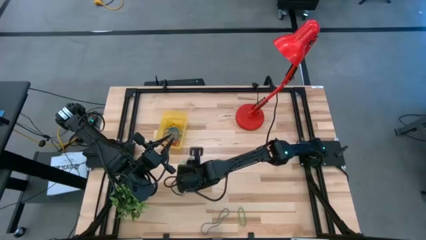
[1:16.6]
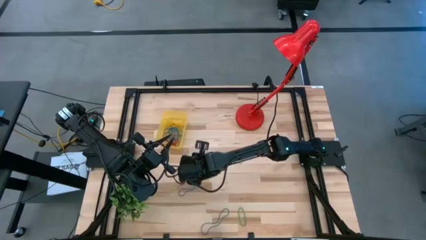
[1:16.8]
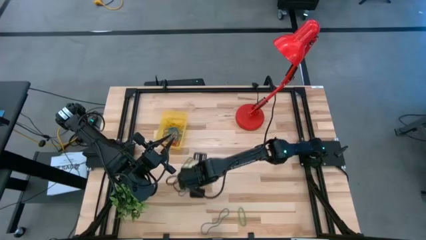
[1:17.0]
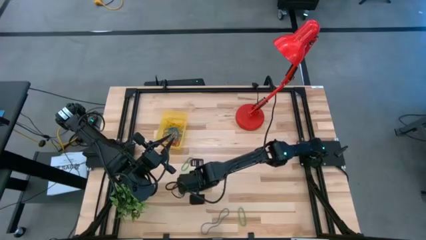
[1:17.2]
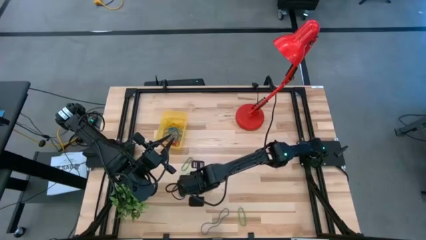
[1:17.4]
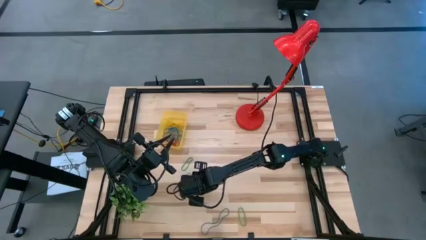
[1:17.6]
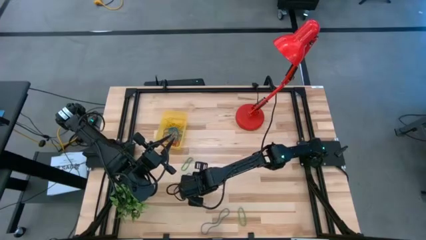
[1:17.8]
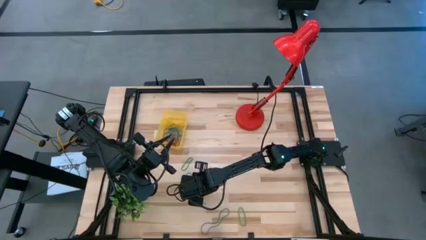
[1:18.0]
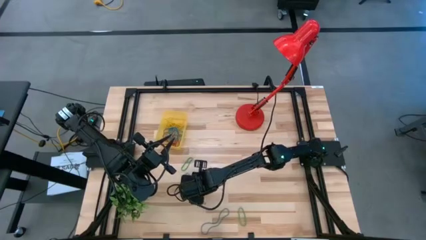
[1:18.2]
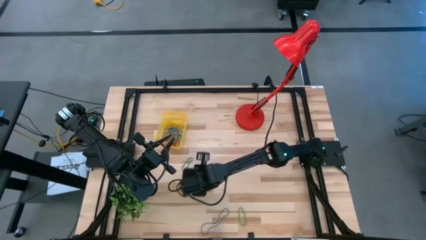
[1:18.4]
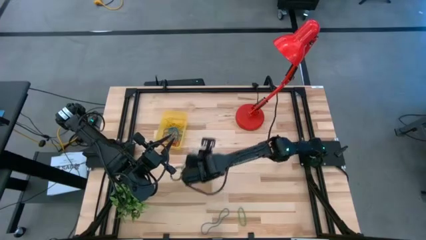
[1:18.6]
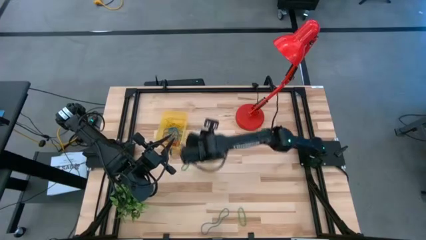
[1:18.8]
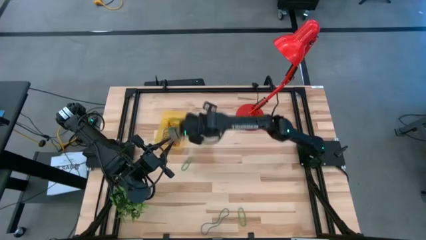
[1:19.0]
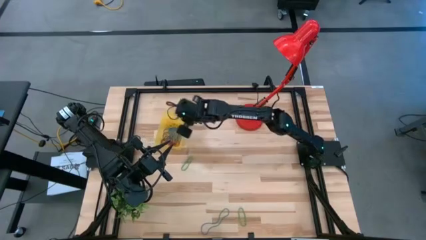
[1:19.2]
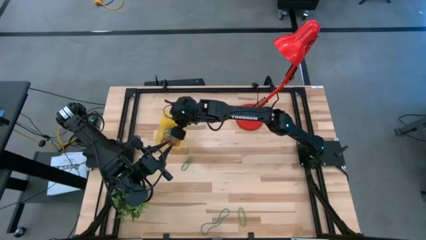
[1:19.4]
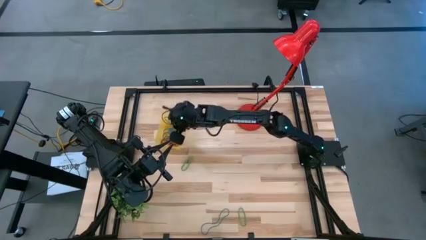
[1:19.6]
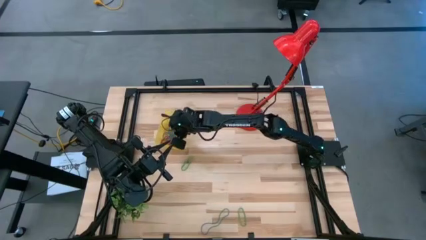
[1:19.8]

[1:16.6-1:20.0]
Task: Pick and place items into bin
Put the blue rubber band into the yellow bin

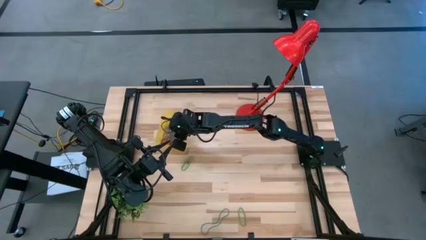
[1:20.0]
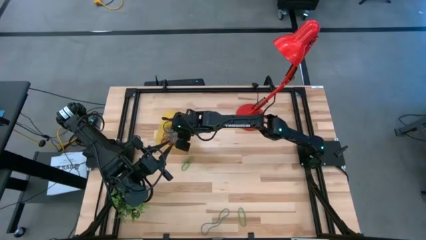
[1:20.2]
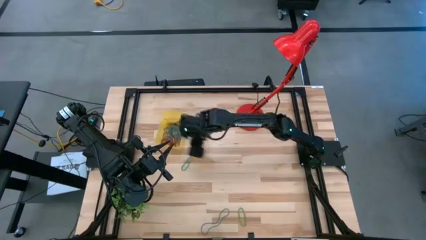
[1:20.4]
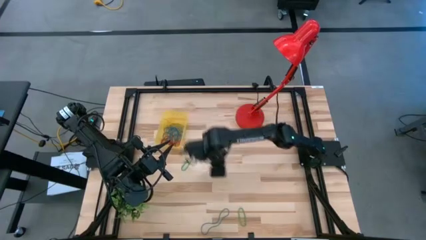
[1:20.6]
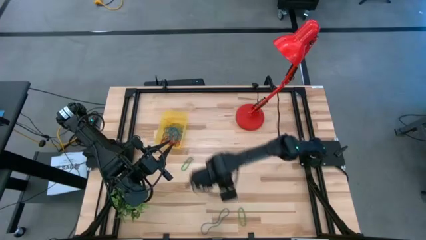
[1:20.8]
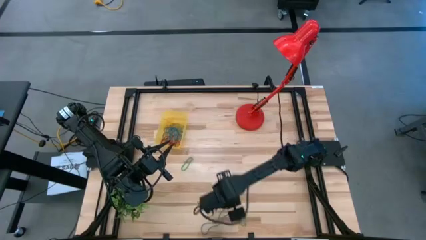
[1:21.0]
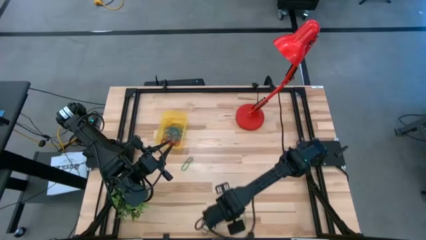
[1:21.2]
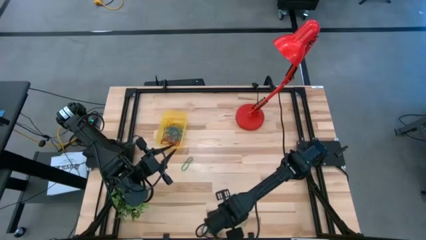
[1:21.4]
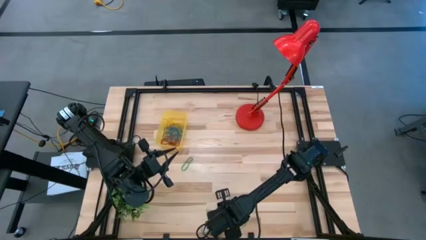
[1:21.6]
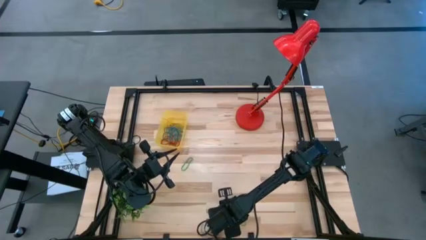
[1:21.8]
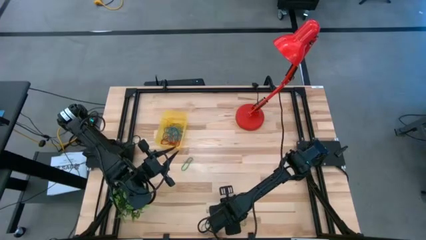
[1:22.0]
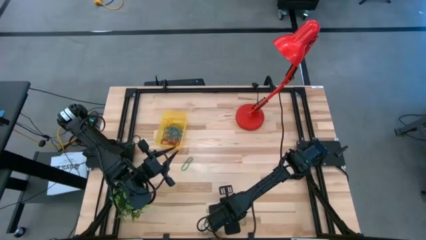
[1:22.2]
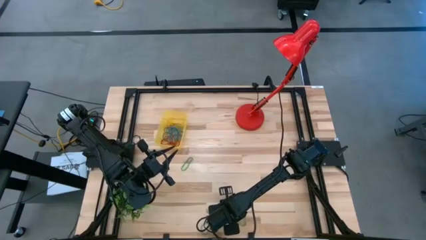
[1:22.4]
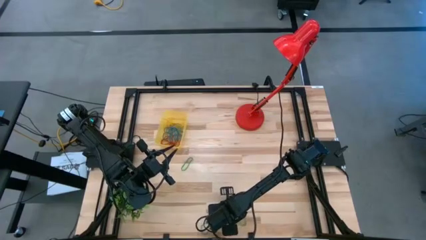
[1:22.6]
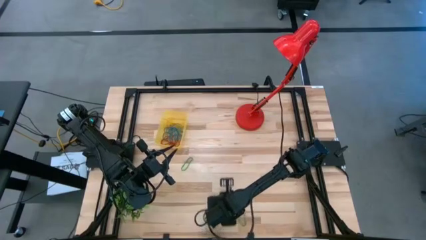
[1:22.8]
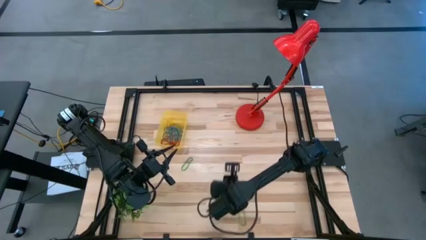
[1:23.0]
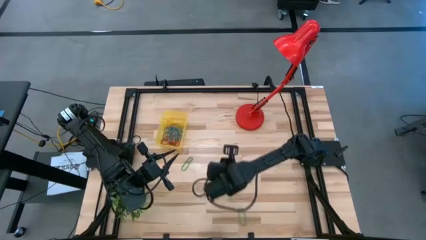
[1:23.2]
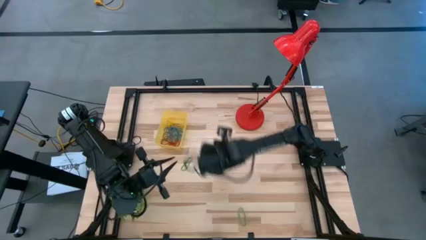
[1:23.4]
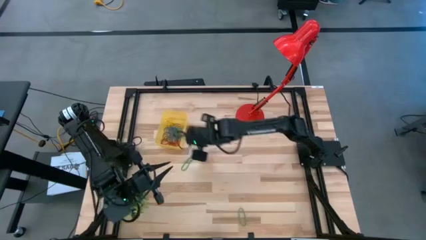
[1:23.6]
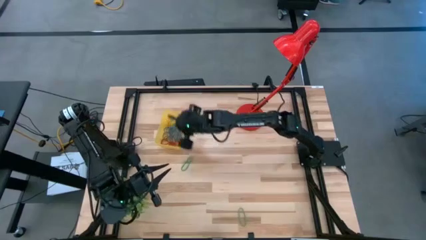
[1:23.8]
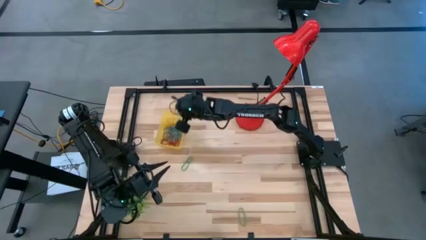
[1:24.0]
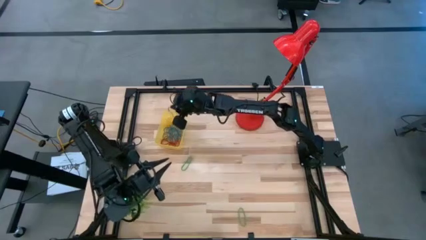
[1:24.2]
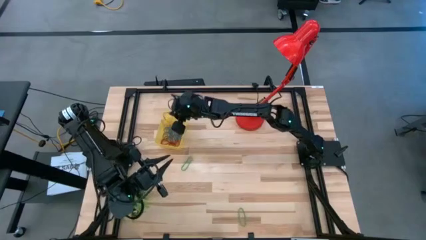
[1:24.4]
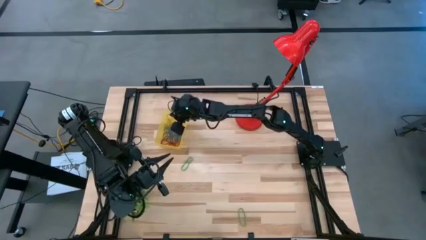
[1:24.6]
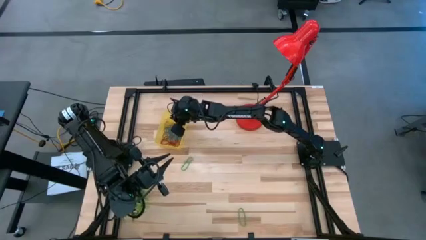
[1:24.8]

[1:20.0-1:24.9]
Put the blue rubber band into the yellow bin

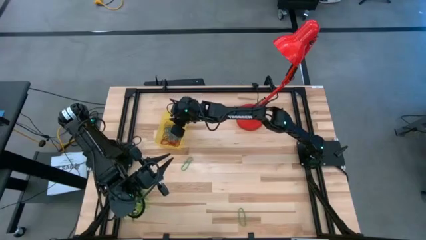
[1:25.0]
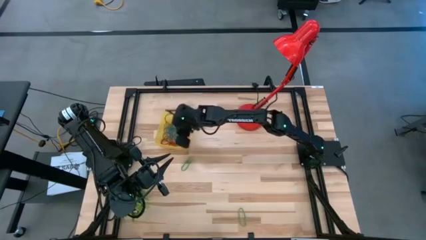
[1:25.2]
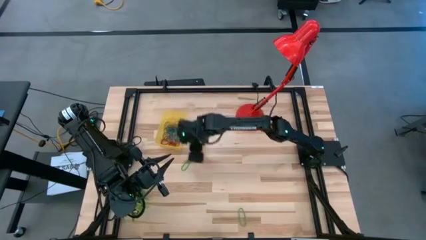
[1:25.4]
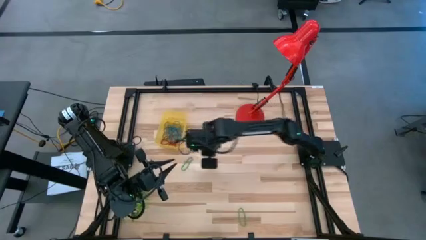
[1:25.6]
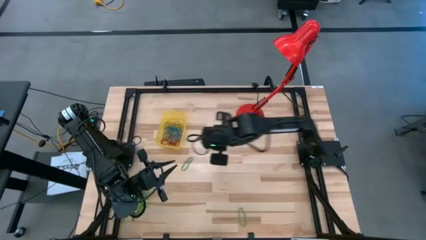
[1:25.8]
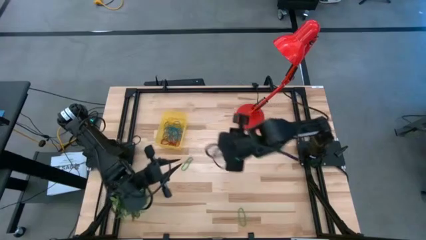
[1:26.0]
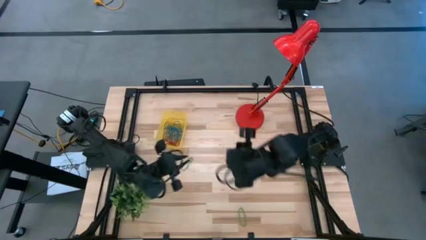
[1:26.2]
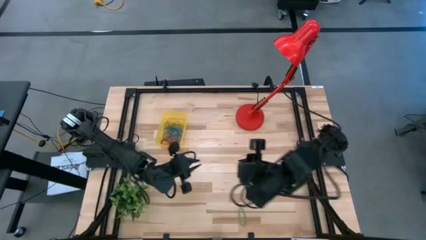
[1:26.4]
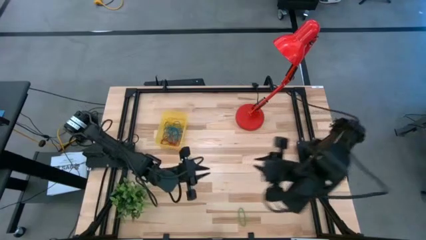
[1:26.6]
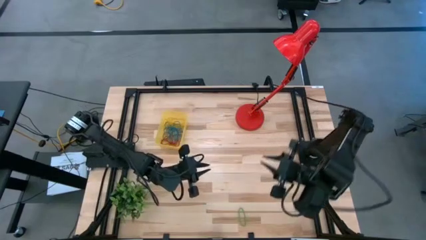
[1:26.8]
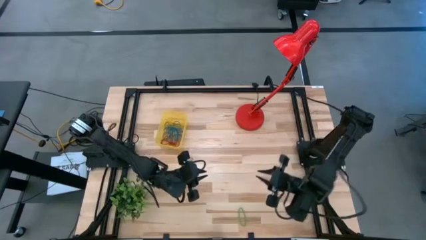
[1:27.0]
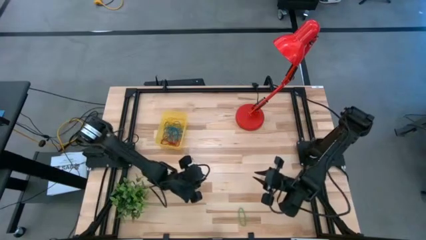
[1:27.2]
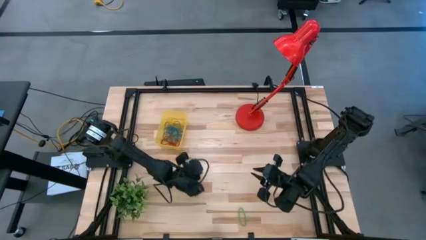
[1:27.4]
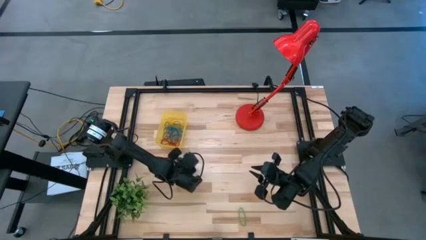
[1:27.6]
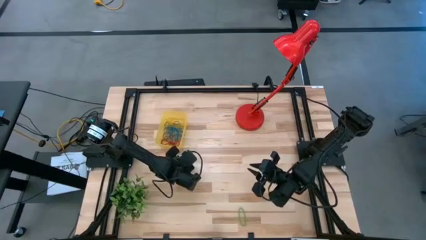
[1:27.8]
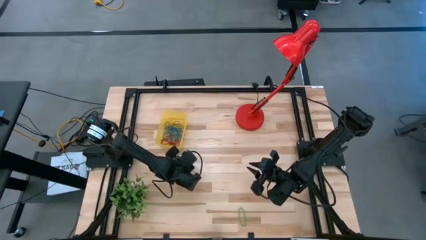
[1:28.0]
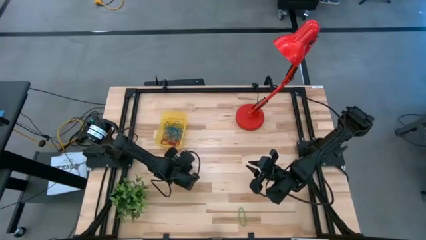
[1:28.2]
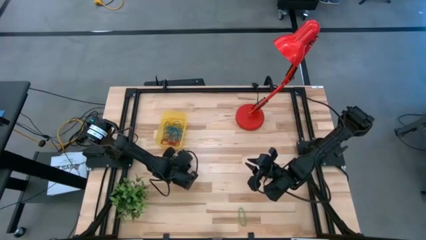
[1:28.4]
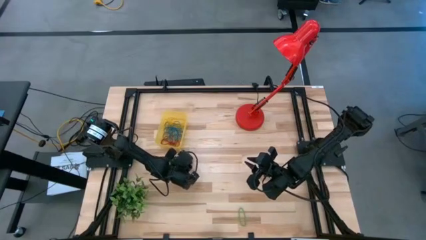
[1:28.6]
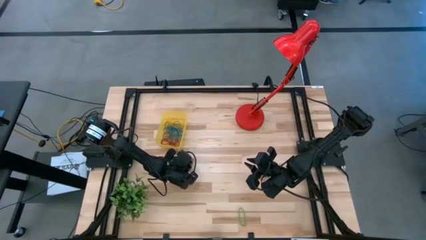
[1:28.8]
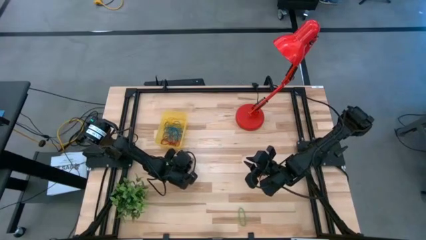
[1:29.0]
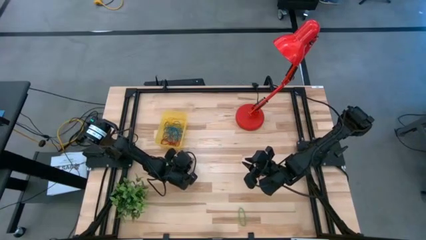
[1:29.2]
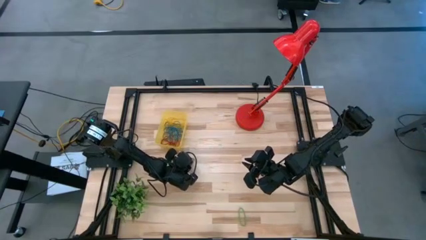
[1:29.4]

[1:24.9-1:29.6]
Put the green rubber band into the yellow bin

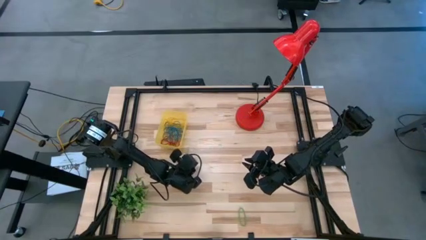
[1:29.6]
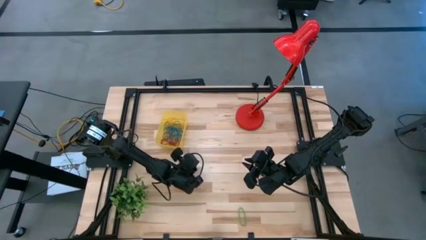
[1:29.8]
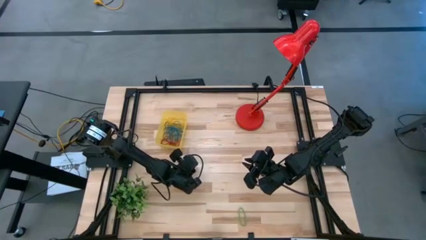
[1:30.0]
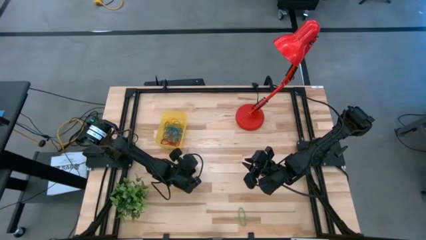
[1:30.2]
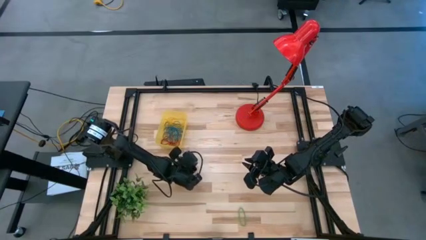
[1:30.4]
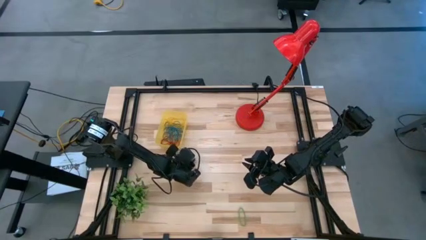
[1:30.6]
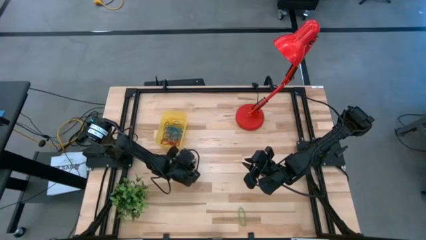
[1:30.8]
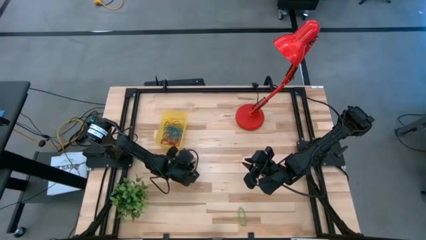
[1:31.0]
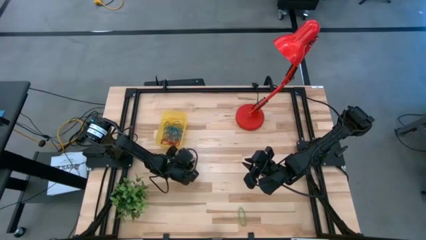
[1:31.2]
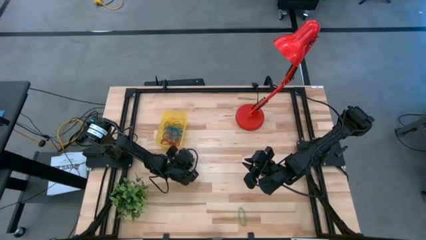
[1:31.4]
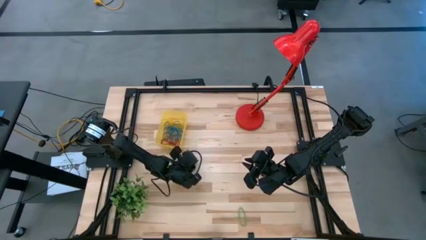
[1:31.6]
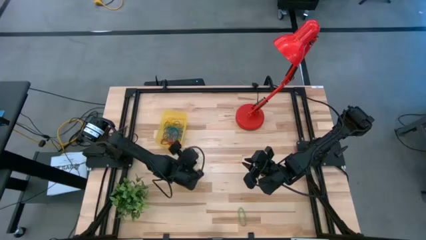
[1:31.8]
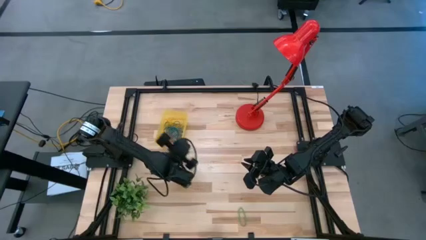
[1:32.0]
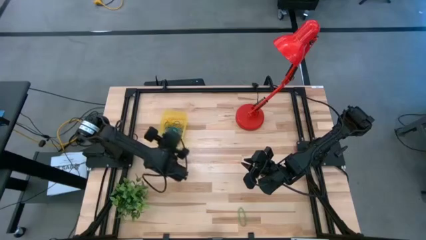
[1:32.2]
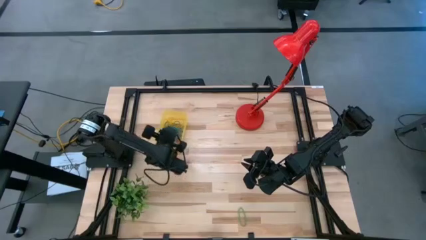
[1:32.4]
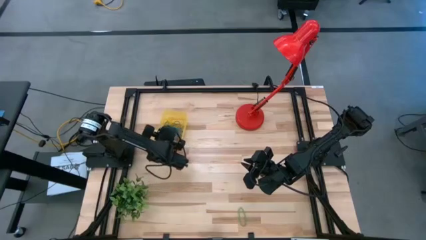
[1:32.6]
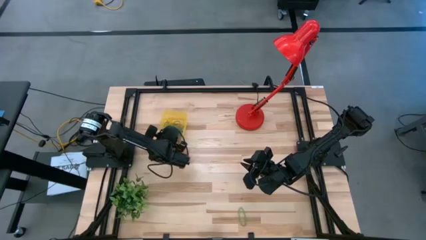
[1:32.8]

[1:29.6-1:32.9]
Put the green rubber band into the yellow bin
